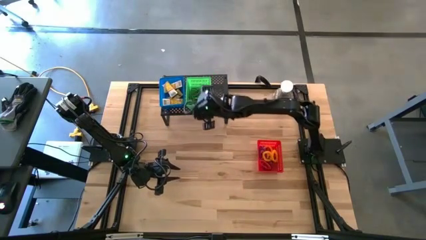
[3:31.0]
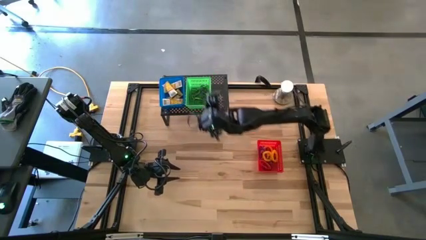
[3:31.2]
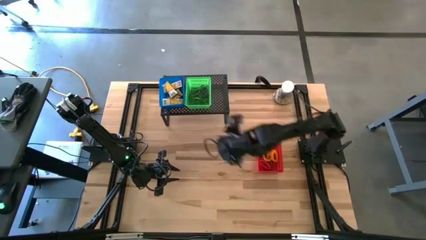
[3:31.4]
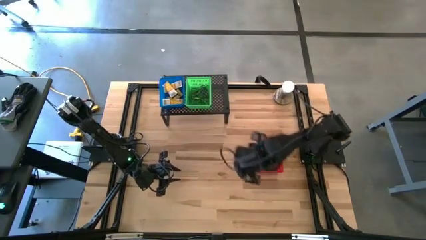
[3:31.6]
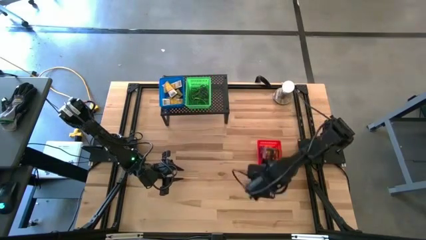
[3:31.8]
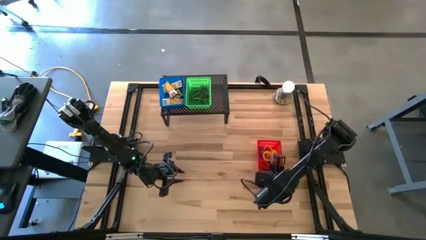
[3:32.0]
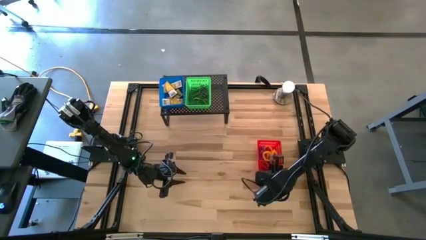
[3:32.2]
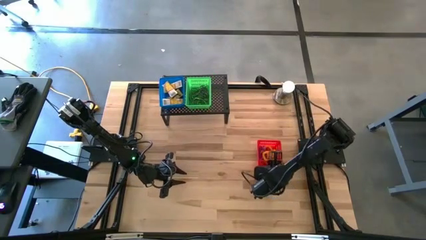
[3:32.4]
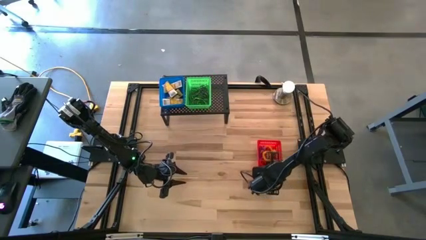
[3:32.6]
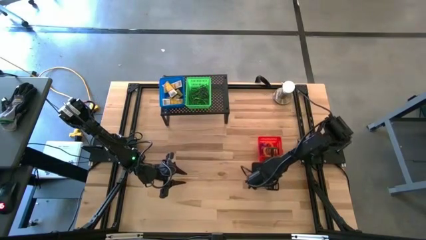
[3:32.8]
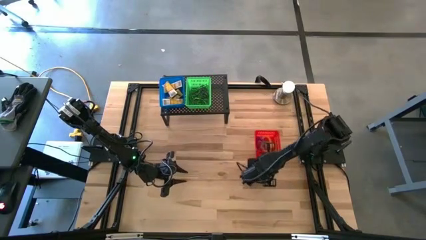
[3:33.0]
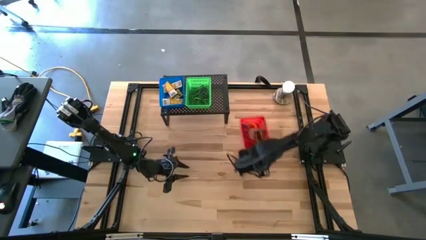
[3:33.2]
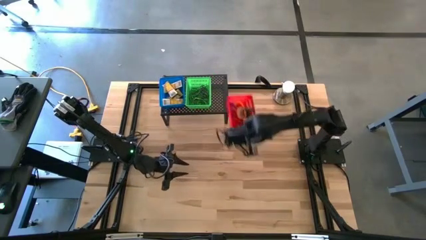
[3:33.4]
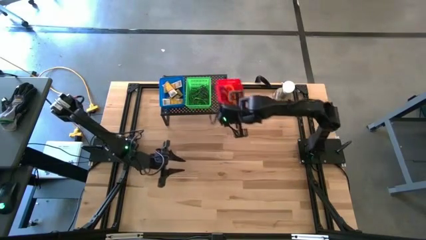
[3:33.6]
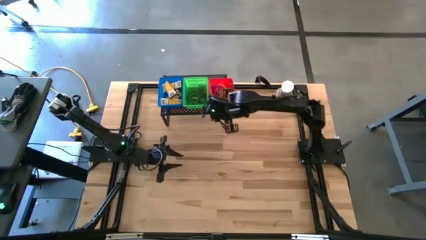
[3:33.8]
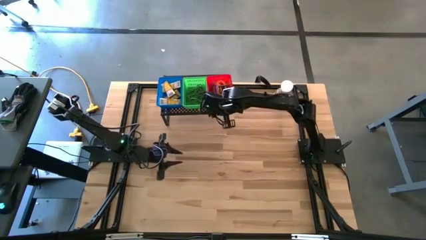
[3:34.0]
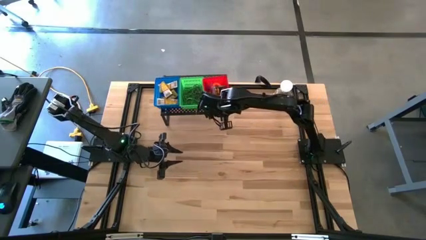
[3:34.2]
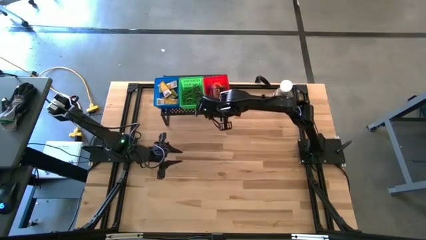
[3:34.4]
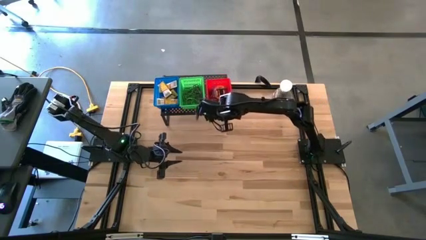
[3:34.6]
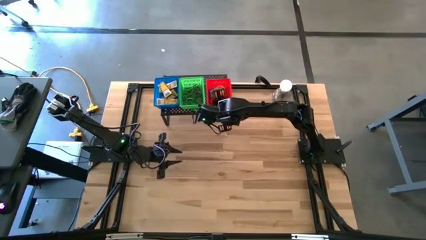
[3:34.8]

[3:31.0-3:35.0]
Task: Pick & Place Office Desk Supplies
Put the red bin on the shelf

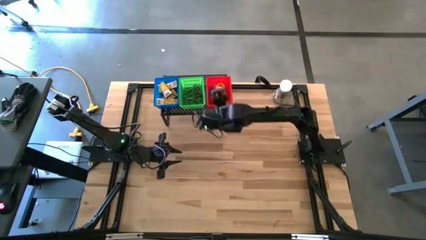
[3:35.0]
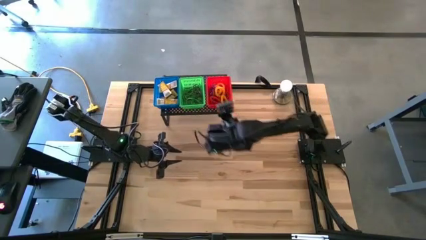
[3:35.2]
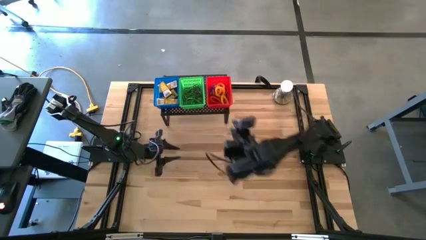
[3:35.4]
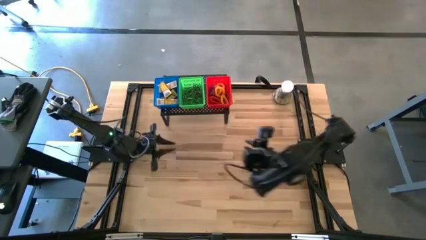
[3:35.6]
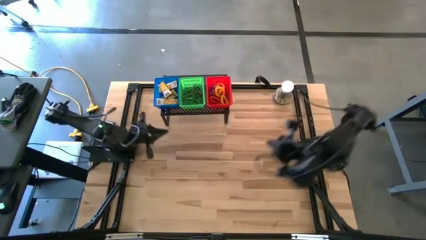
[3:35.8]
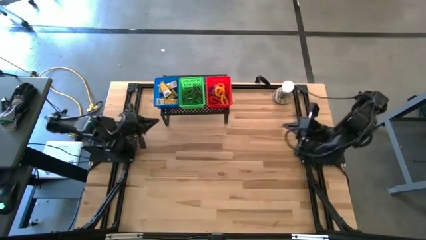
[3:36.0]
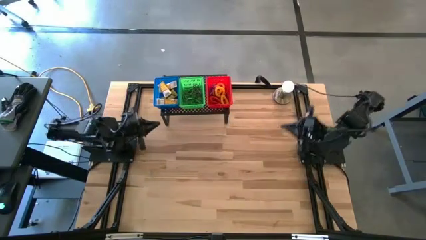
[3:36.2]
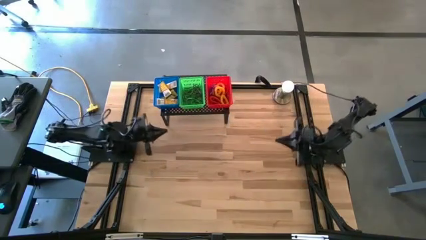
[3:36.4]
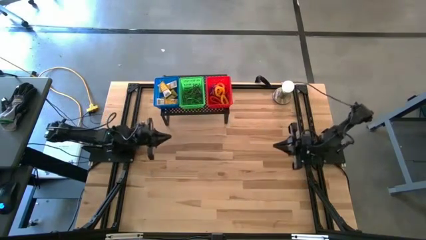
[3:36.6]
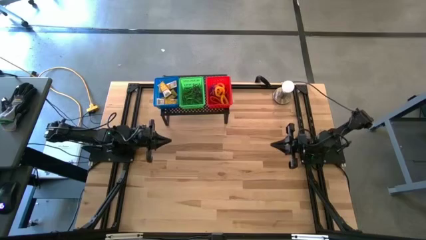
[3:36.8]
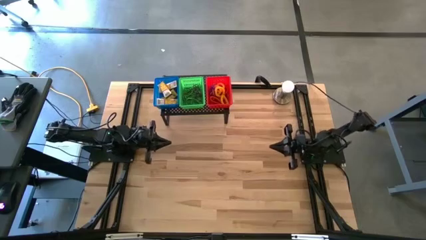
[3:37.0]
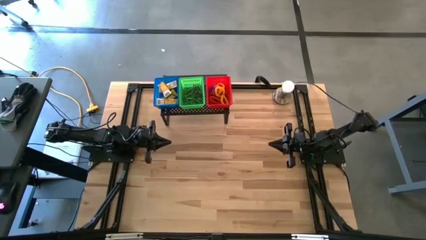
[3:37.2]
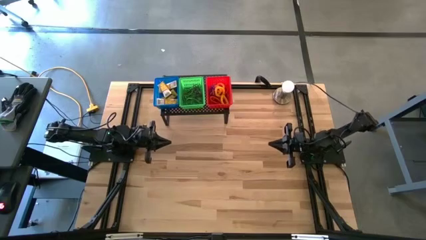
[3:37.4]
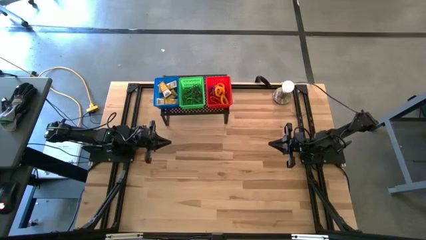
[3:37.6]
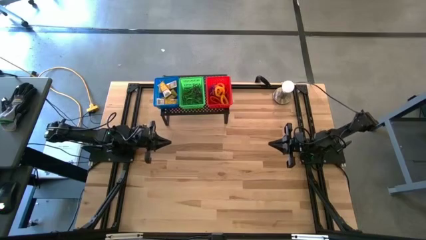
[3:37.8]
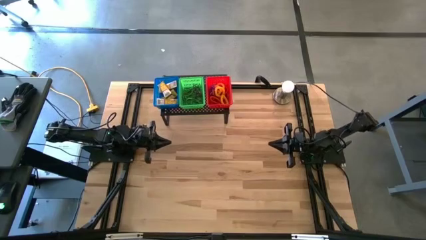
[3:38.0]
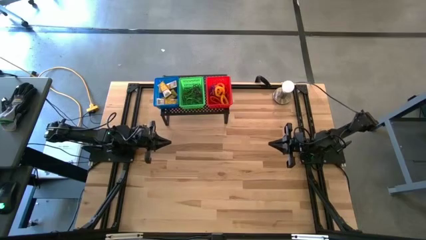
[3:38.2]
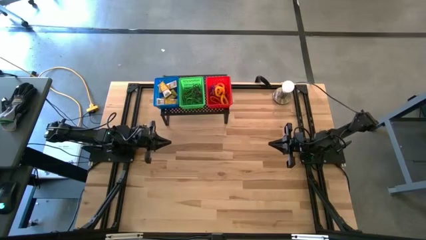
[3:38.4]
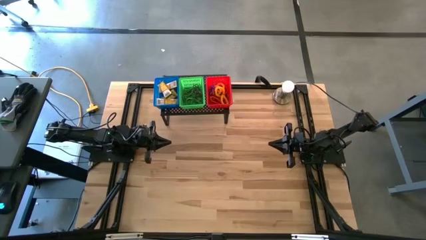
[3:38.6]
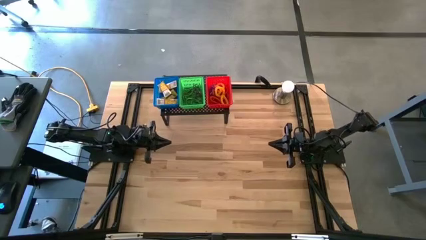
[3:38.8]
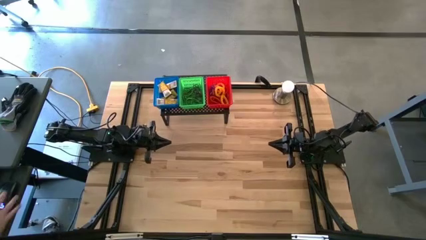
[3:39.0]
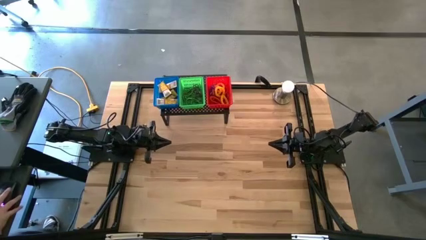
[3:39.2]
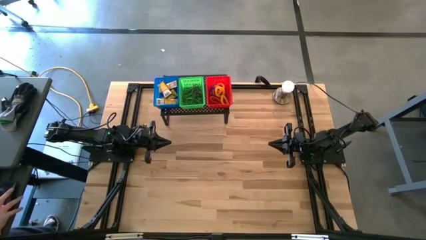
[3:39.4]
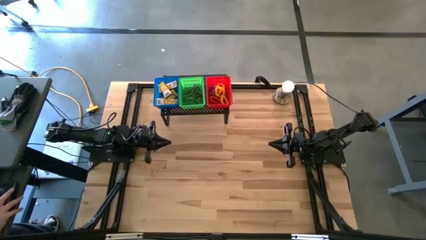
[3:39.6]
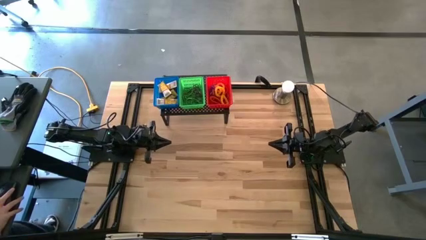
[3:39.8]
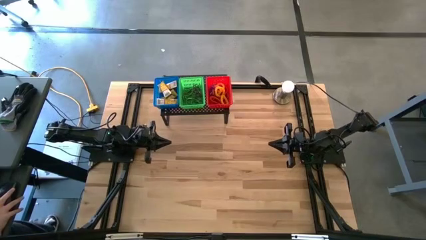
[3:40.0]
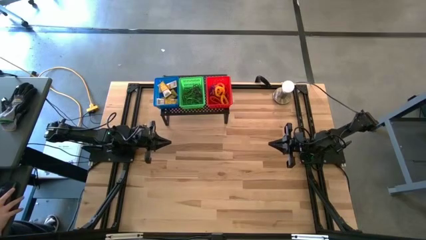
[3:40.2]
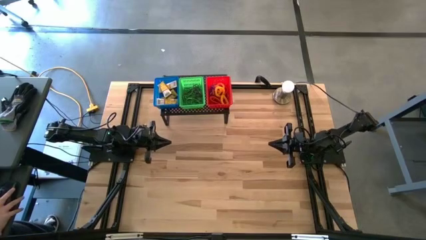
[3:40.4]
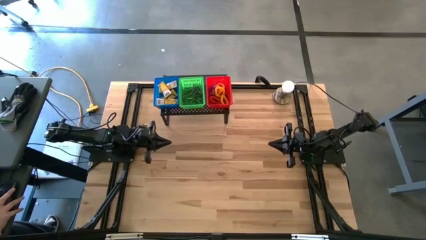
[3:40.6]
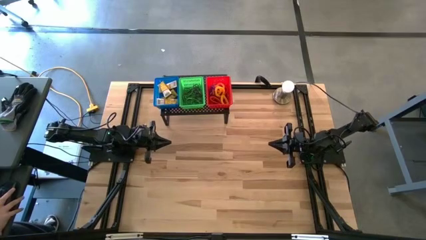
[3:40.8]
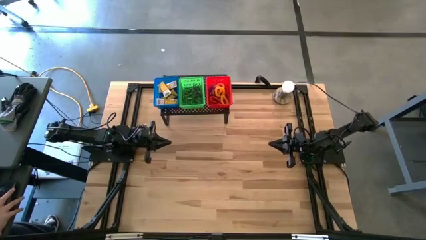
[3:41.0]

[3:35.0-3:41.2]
Return to Home Position

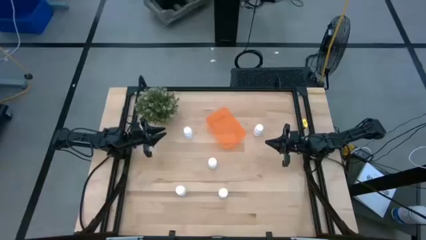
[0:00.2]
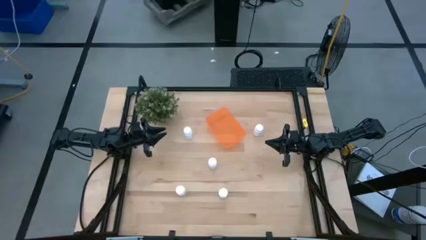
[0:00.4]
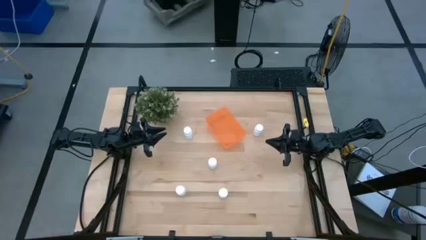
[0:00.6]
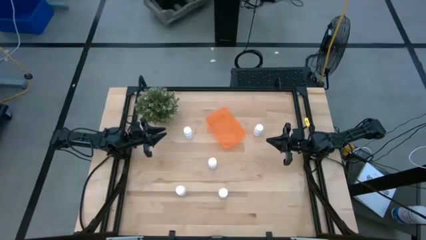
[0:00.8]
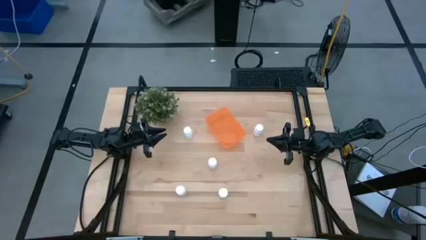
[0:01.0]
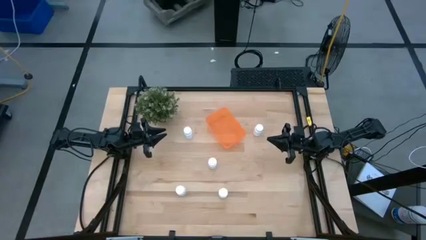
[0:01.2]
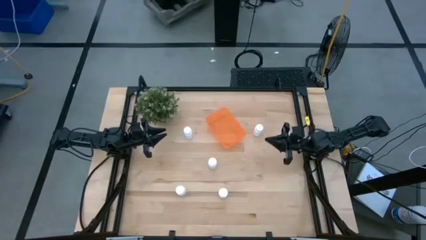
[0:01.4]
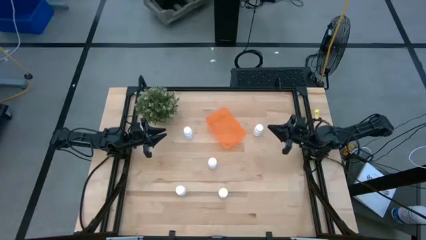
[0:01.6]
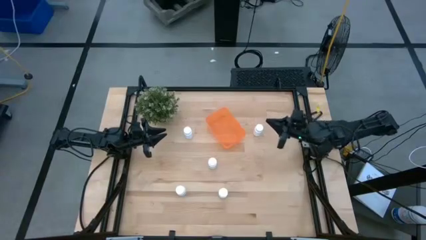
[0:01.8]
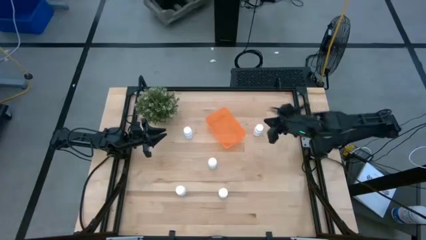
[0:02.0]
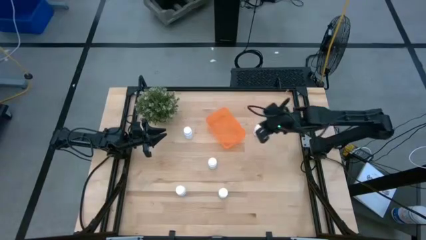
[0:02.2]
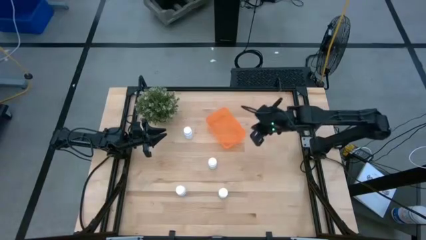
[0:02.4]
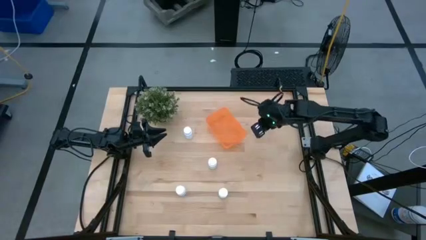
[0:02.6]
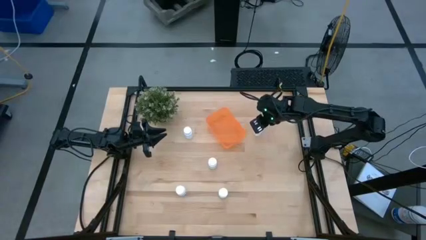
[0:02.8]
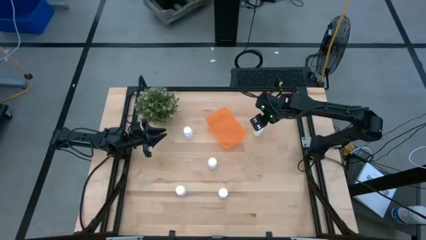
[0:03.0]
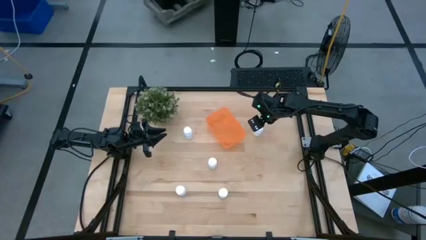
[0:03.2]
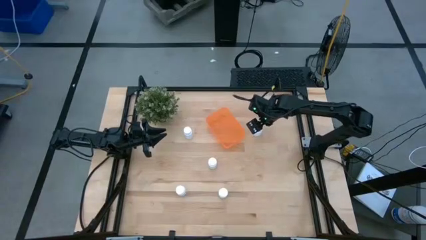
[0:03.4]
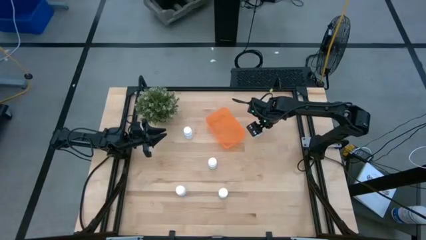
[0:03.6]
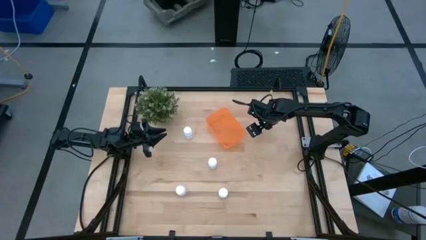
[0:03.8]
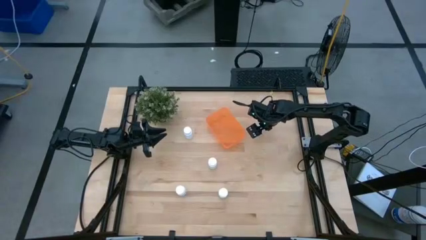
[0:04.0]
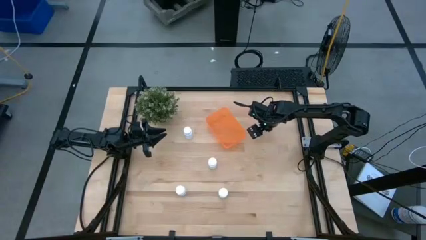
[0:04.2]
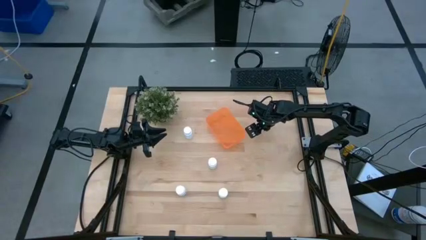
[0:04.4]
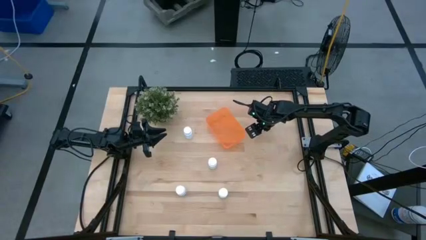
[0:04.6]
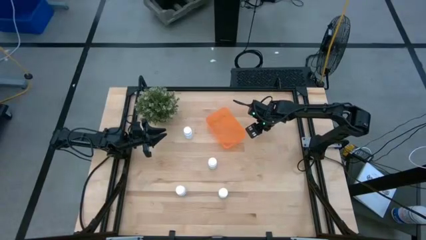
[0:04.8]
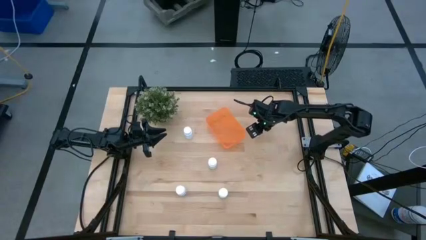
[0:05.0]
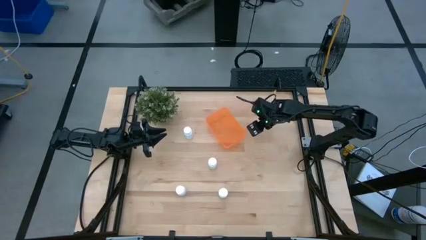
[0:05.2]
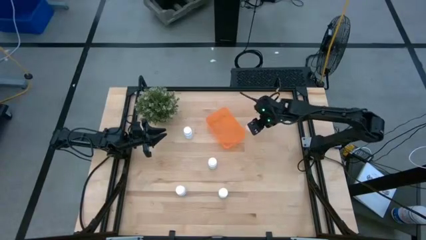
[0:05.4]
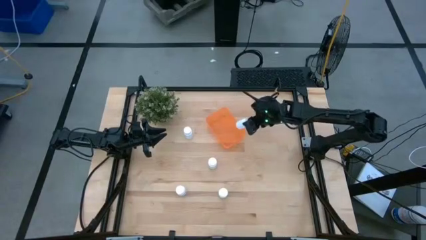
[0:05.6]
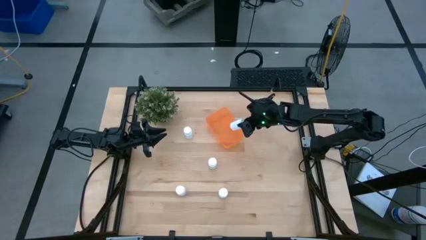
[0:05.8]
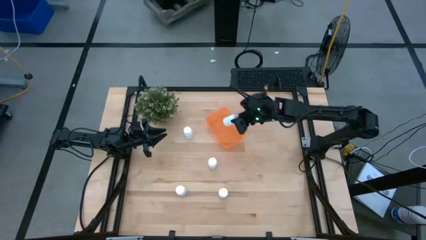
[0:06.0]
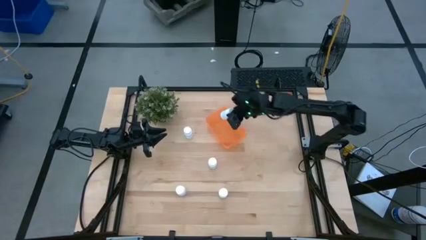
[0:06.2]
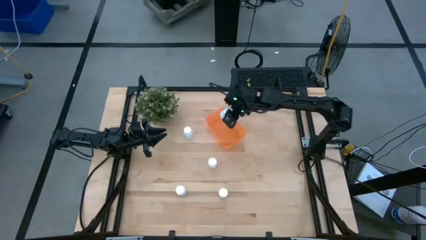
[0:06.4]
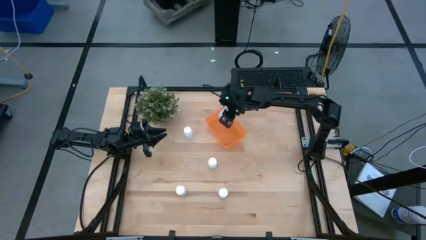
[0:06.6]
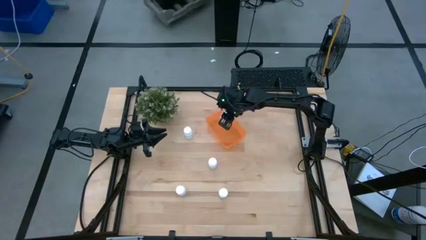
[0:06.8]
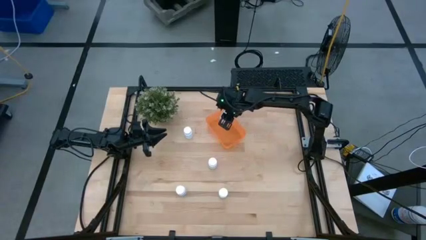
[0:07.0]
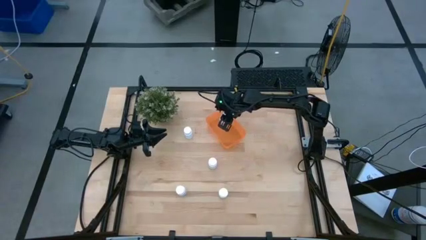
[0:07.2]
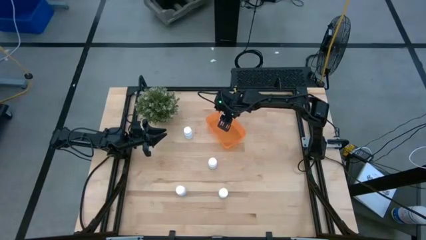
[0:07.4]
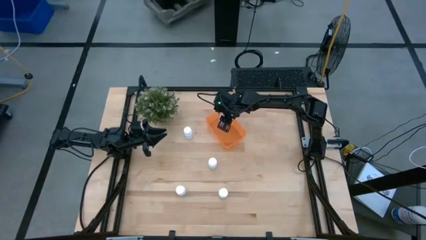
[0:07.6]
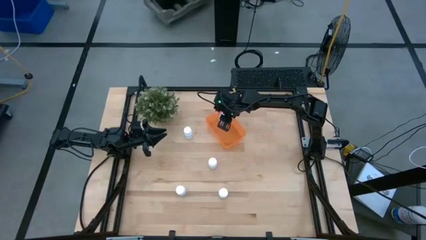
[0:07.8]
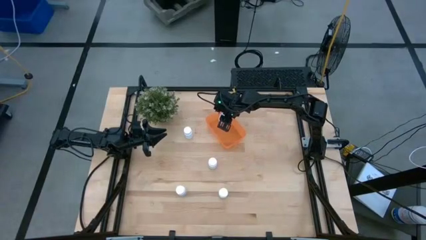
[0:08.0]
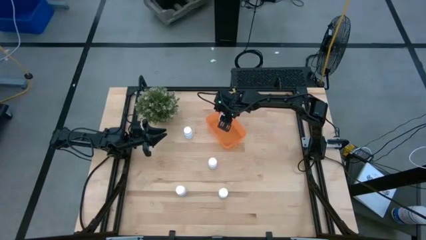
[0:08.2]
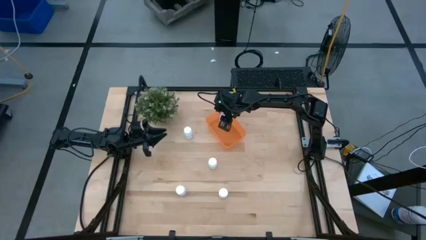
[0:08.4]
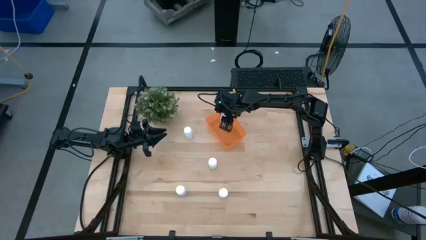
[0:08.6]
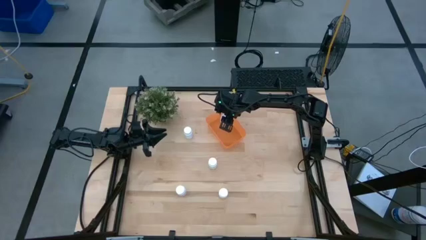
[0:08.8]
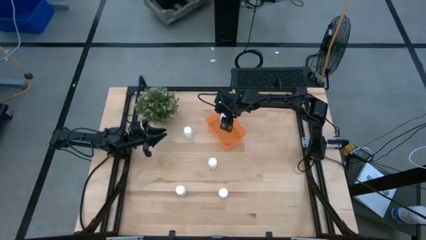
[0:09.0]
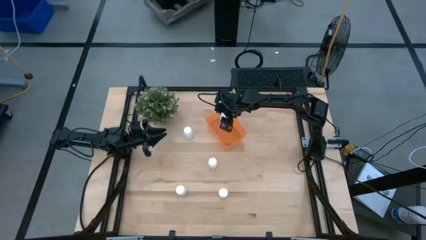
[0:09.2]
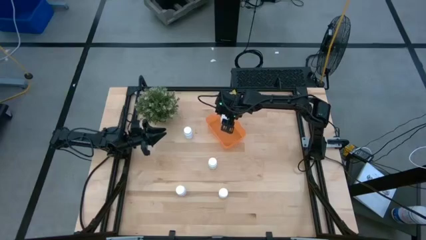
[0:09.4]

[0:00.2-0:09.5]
Task: Pick and place pill bottles into a basket
Put the white pill bottle into the orange bin
